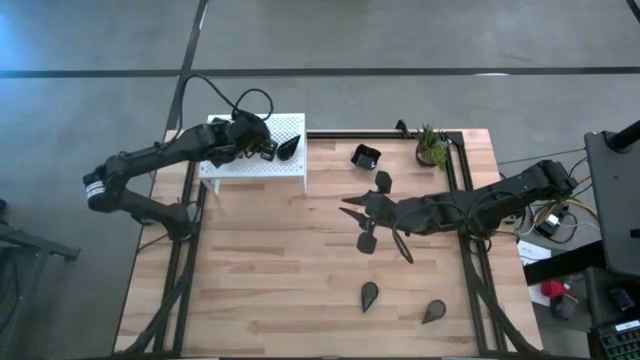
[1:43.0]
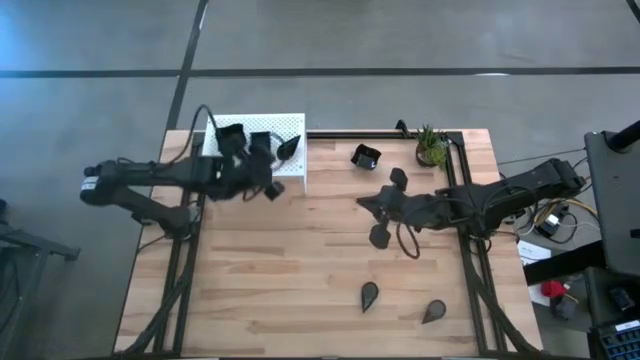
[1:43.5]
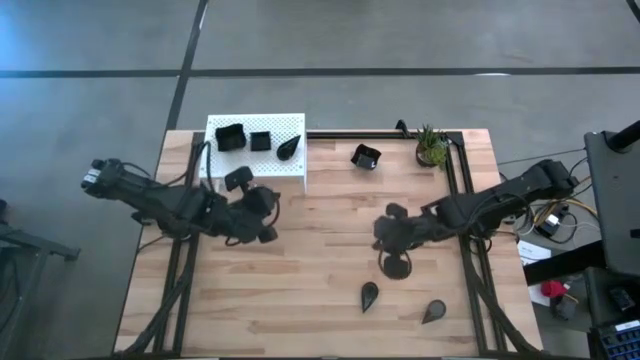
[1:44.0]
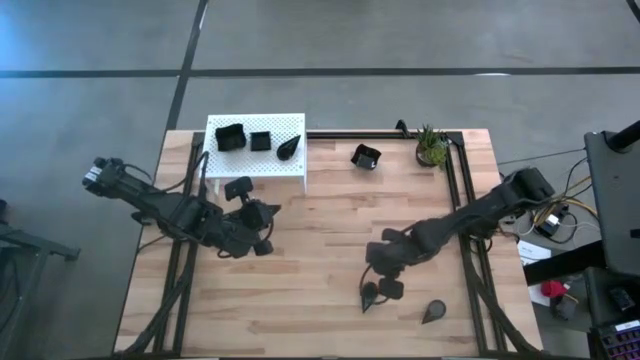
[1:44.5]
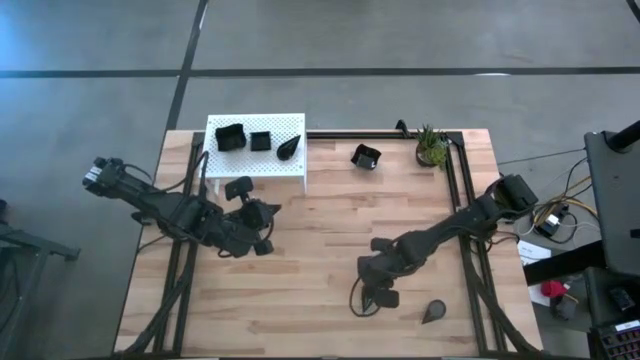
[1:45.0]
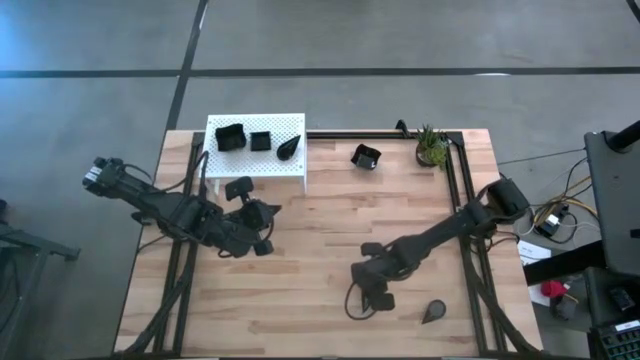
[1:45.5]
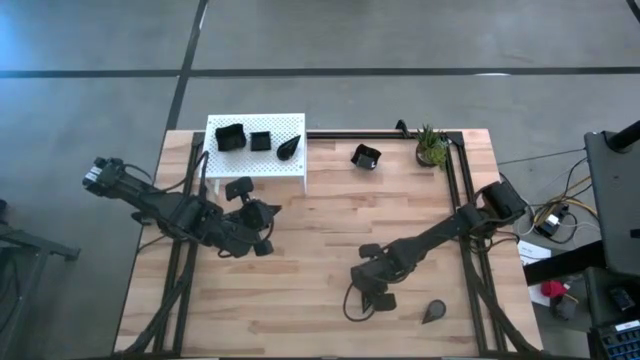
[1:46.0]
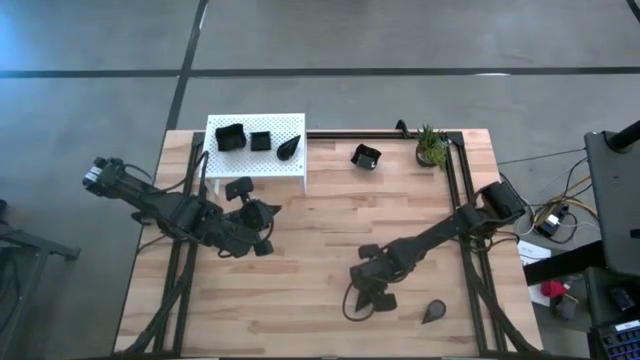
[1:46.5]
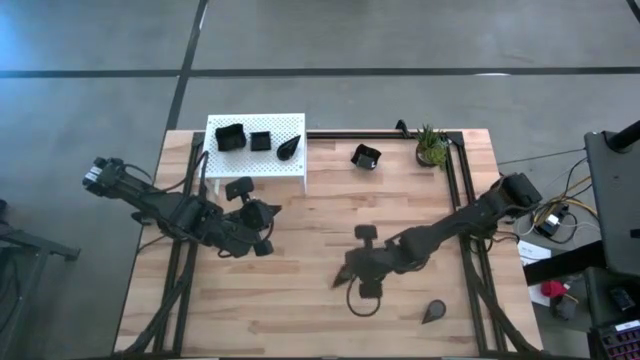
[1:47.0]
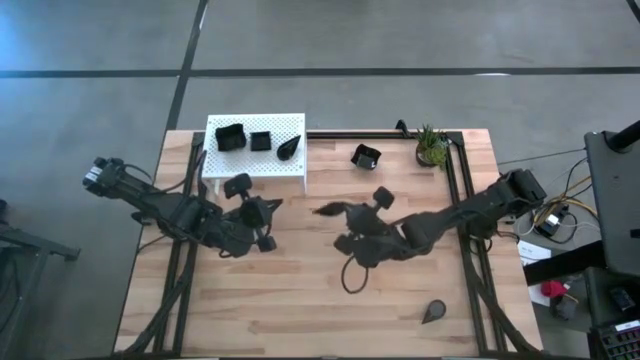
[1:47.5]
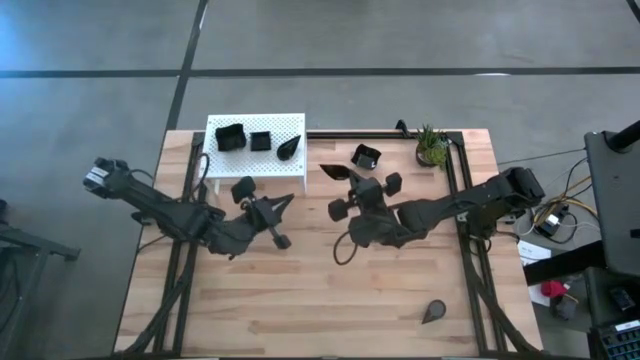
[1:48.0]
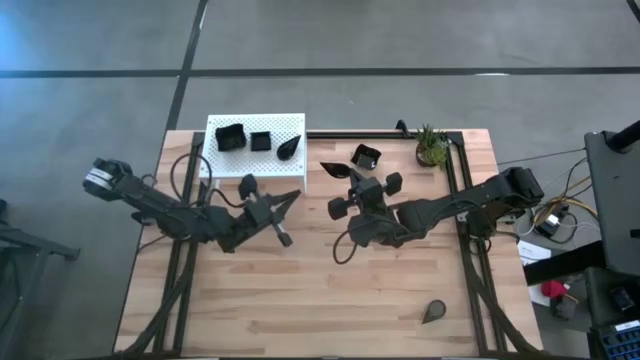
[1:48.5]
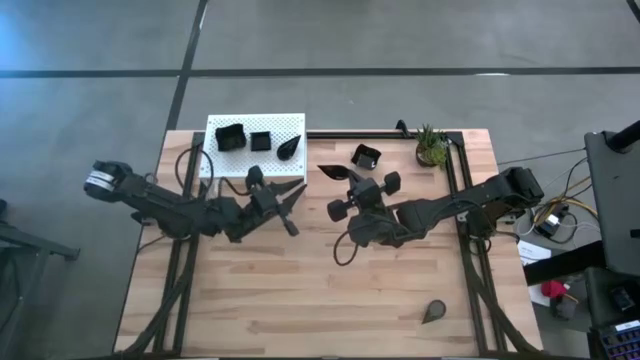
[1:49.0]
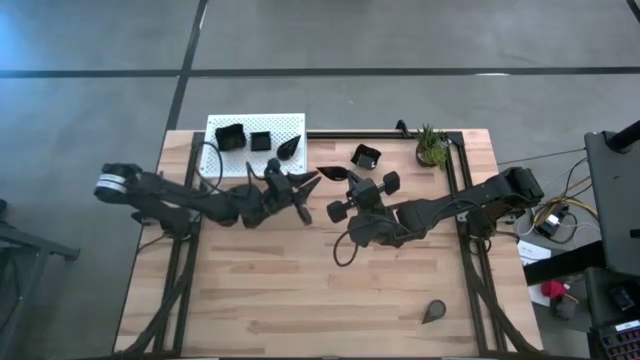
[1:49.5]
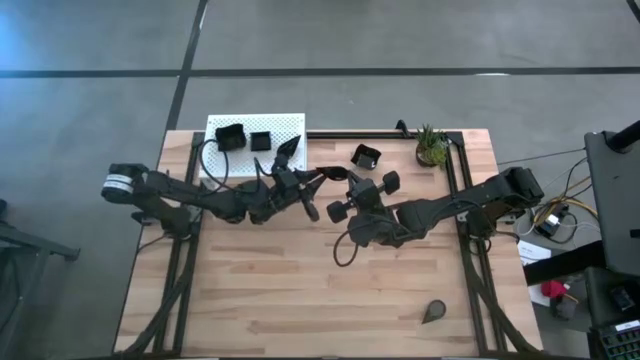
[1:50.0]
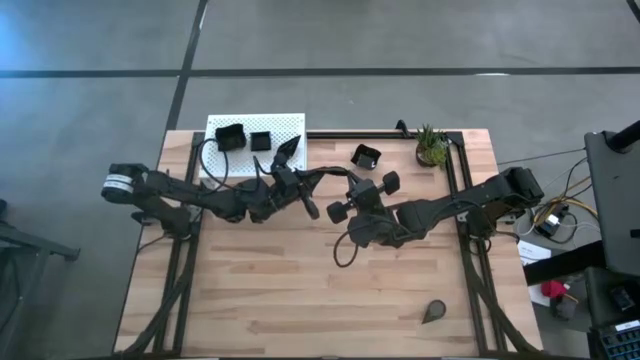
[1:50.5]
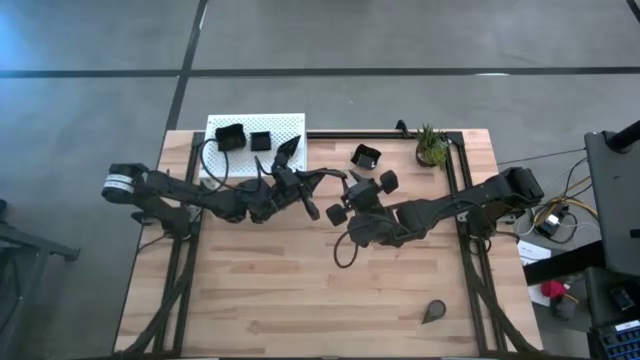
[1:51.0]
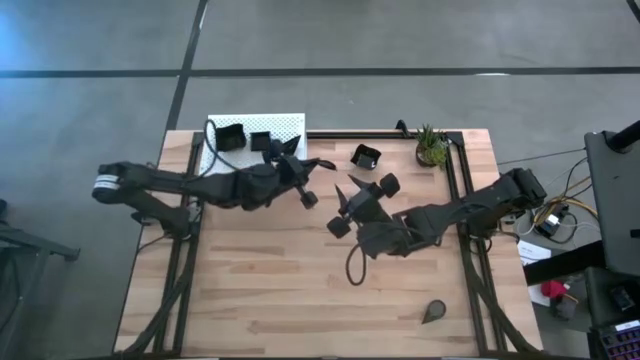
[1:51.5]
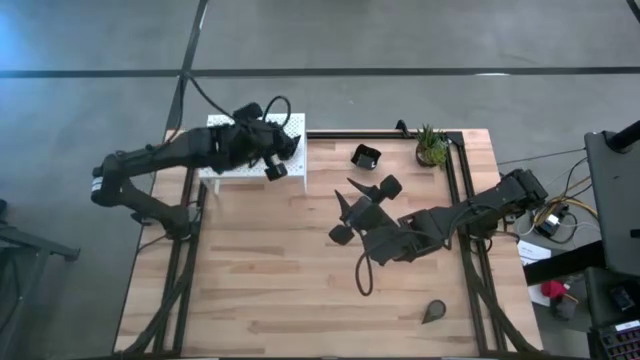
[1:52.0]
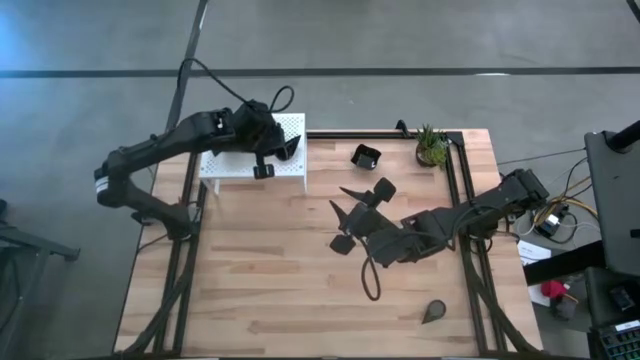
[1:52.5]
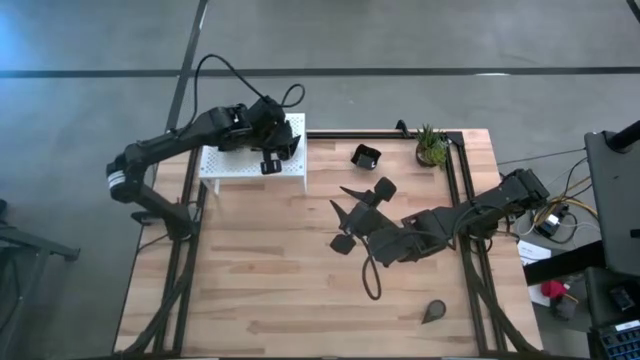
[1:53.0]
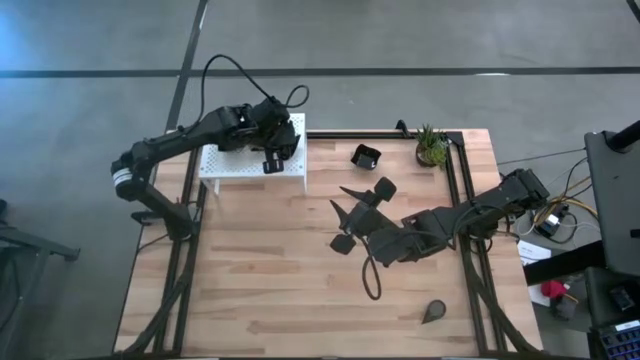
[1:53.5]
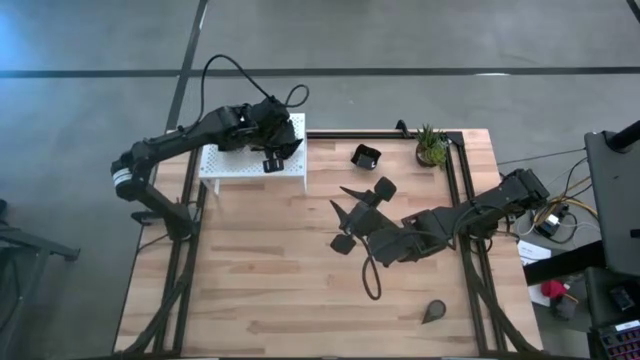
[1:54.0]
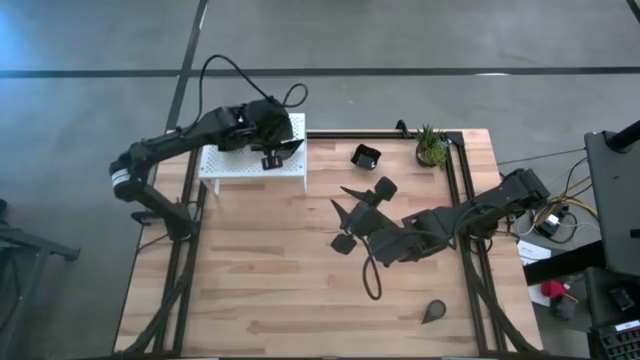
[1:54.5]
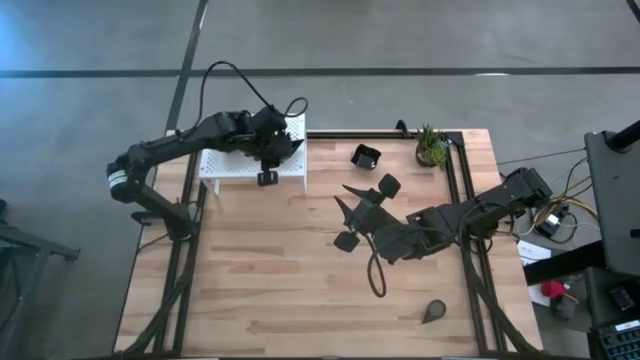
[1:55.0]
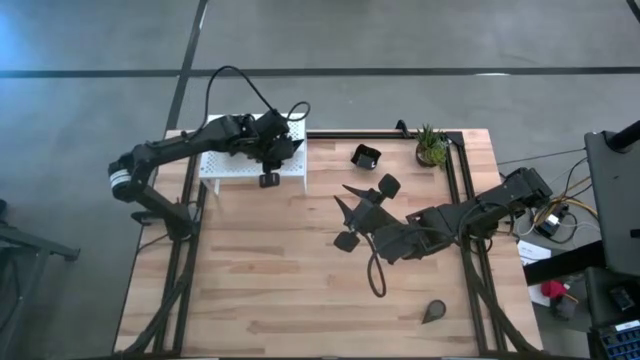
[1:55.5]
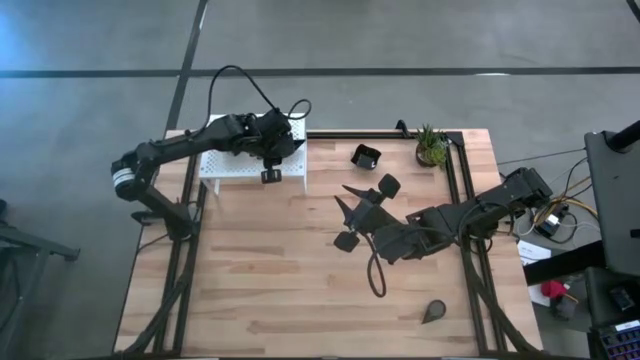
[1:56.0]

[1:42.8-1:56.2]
Task: Pick & Place Mini shaped plates
Stack the drop shaped plate on top of the other drop shaped plate on the shelf

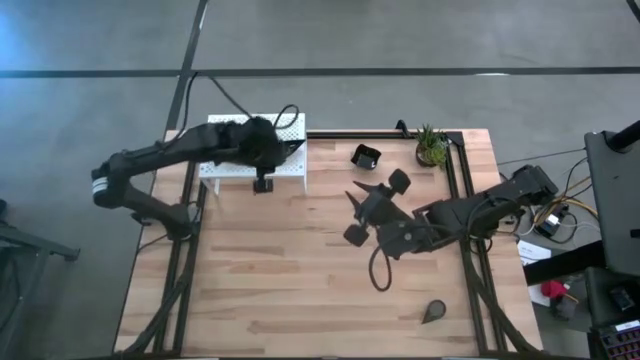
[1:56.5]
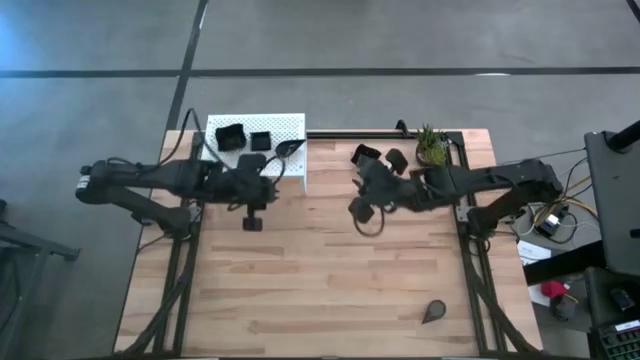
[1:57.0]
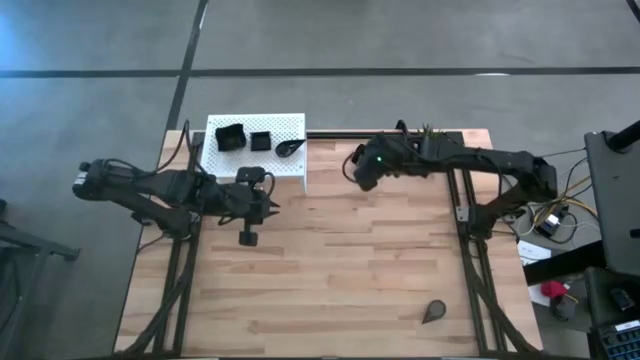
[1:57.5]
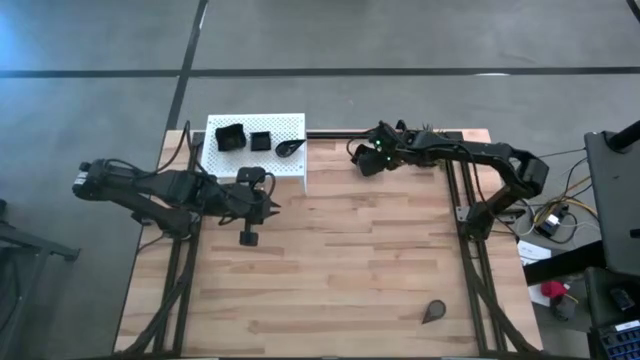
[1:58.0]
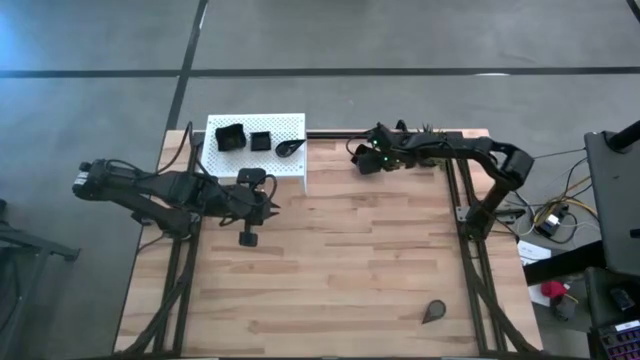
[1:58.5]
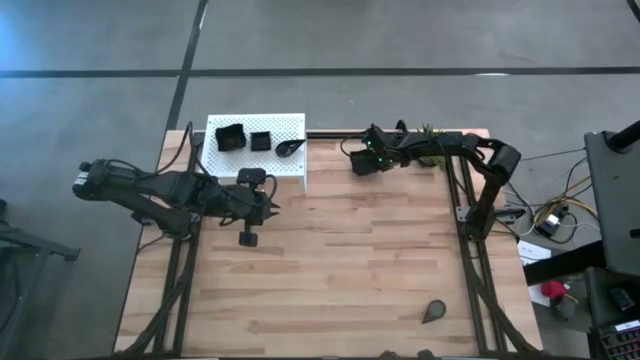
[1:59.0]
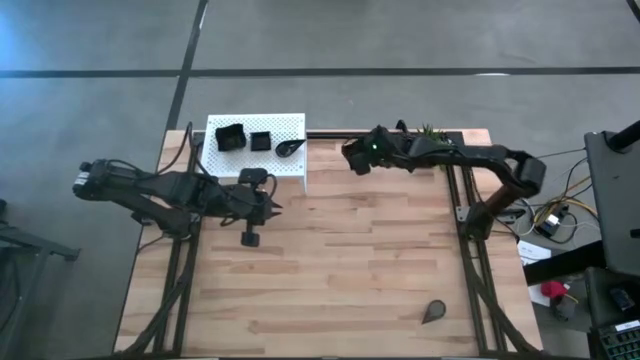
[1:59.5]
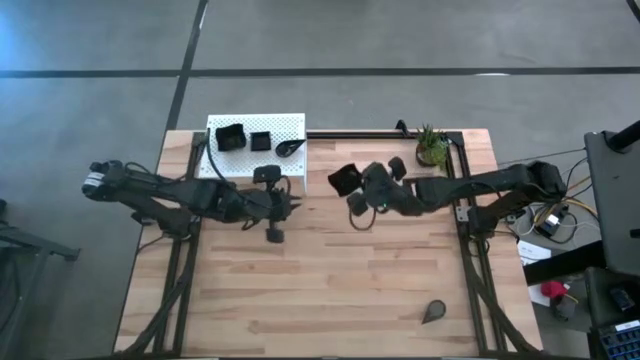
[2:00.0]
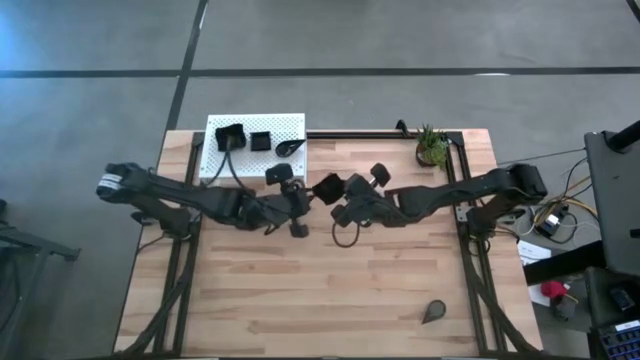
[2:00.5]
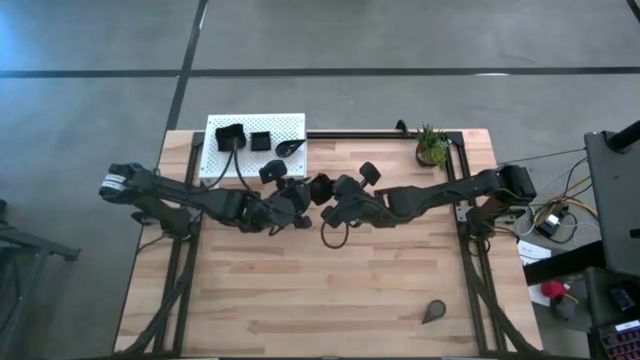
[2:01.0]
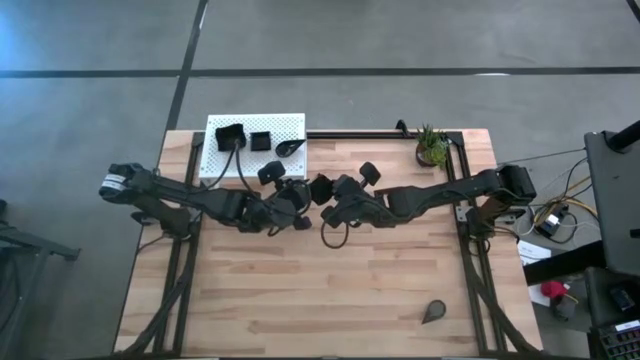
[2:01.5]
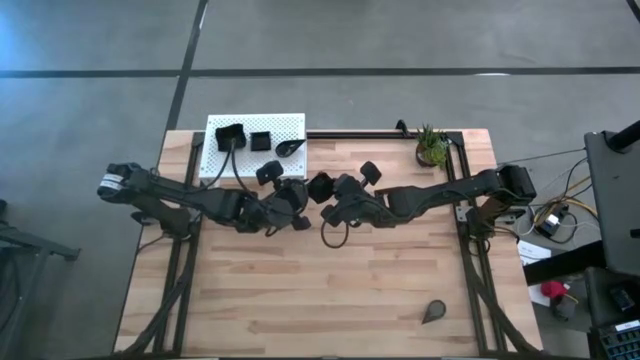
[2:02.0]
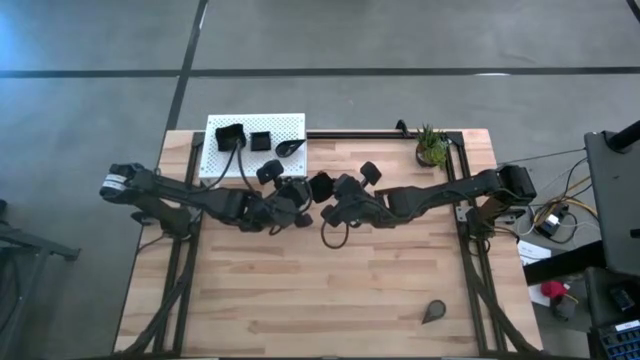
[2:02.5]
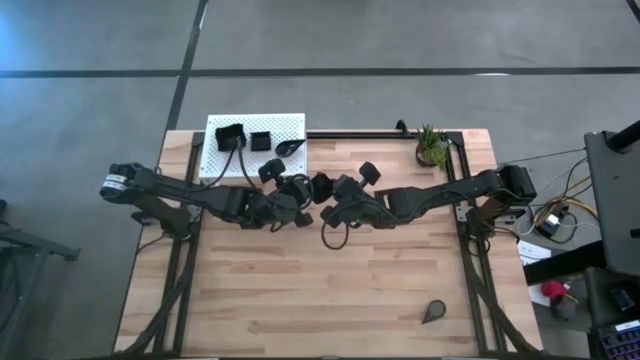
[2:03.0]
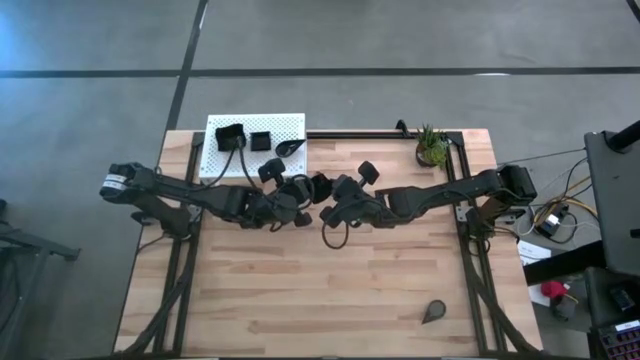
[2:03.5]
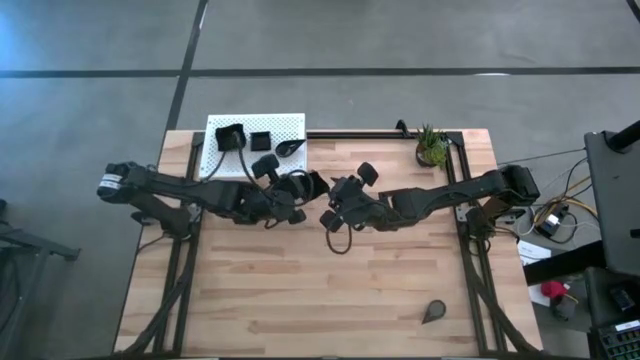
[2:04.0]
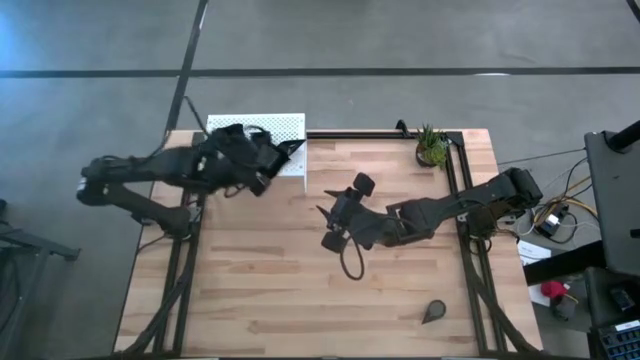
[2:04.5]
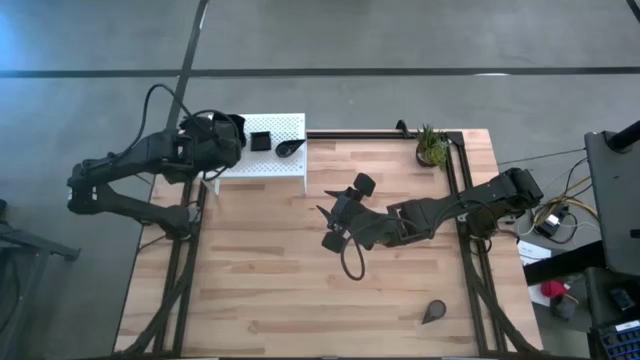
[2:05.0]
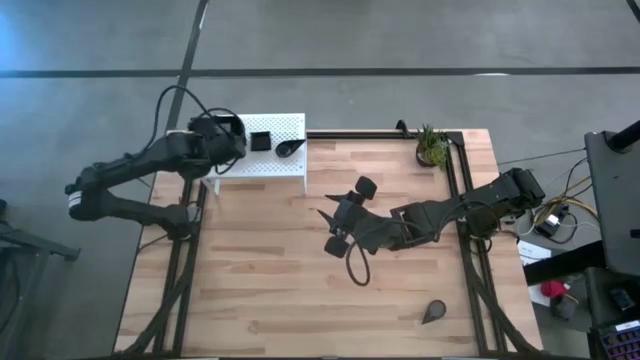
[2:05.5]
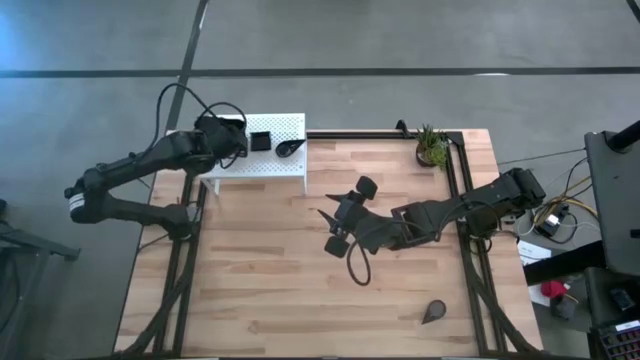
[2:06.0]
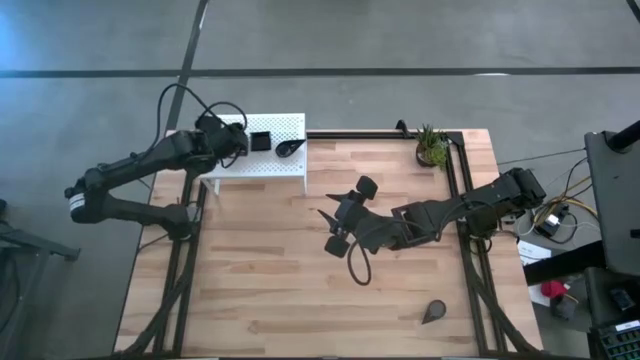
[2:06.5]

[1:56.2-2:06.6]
Stack the distorted square plate on top of the other distorted square plate on the shelf
